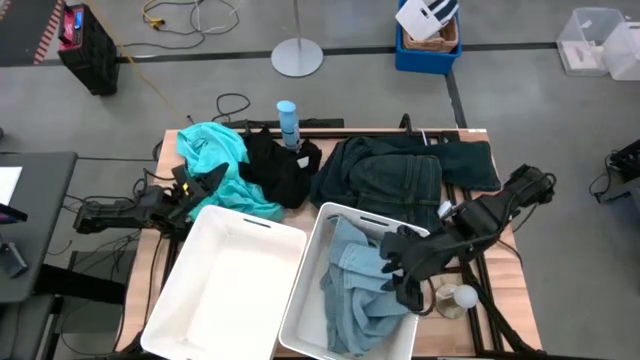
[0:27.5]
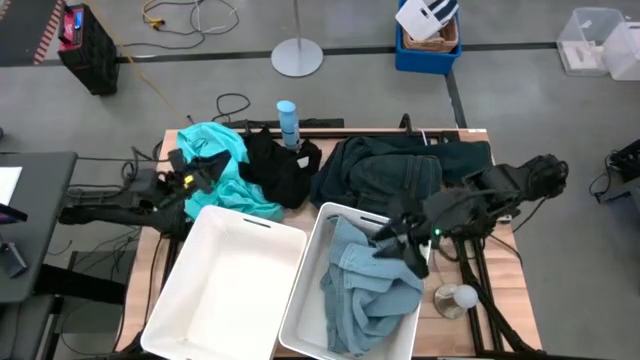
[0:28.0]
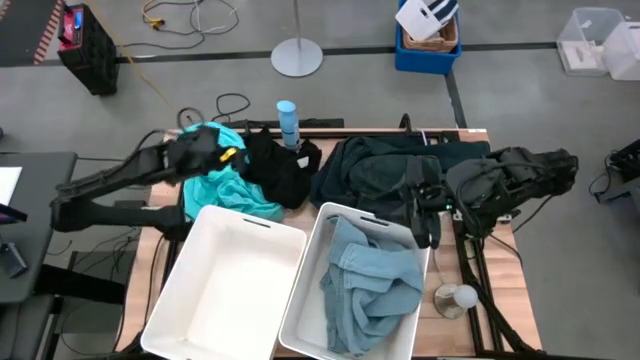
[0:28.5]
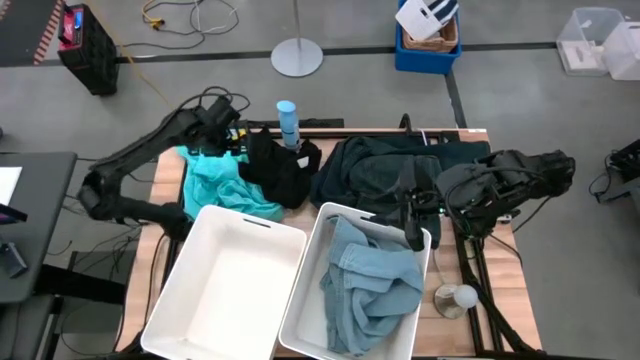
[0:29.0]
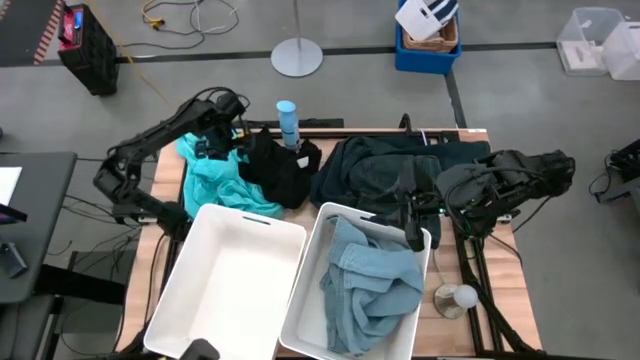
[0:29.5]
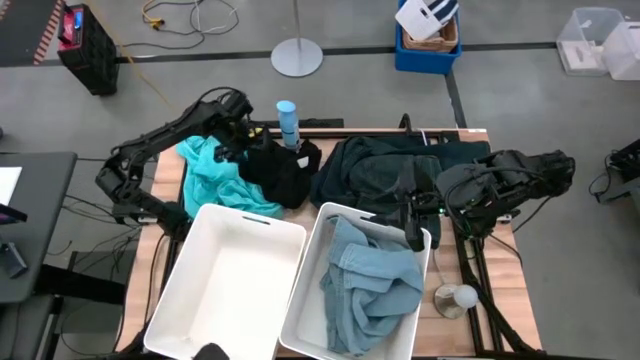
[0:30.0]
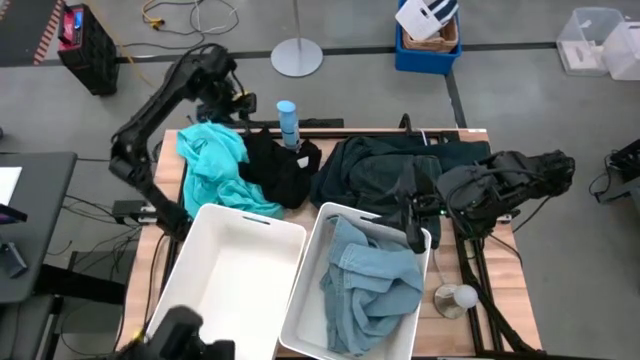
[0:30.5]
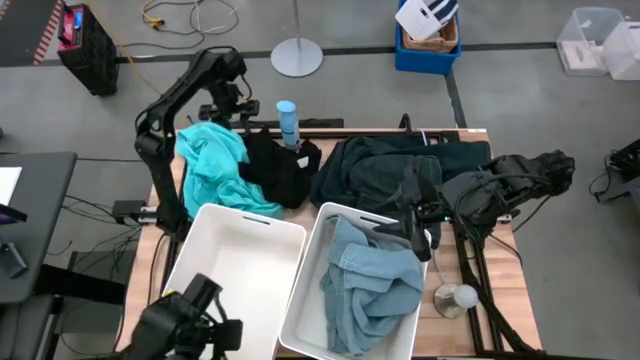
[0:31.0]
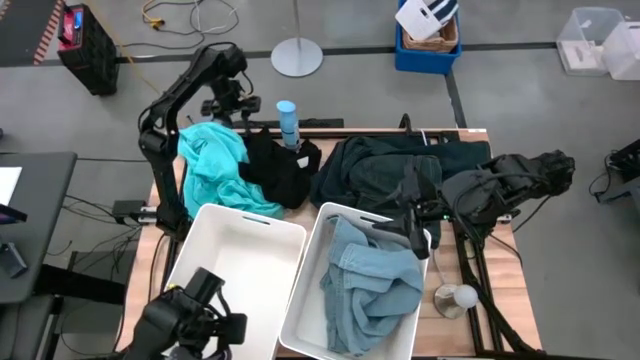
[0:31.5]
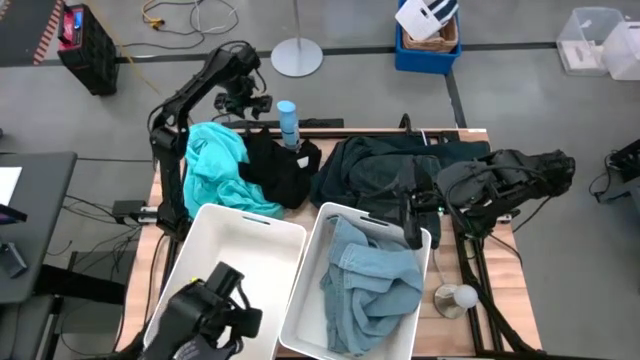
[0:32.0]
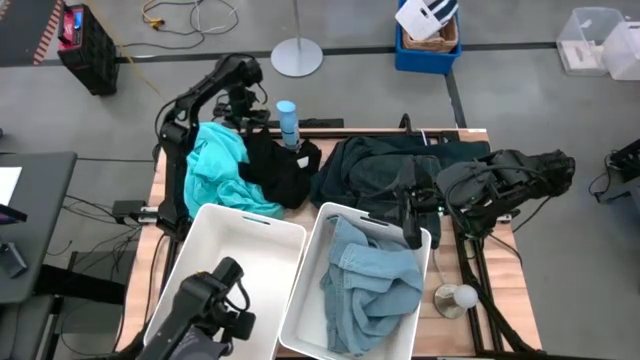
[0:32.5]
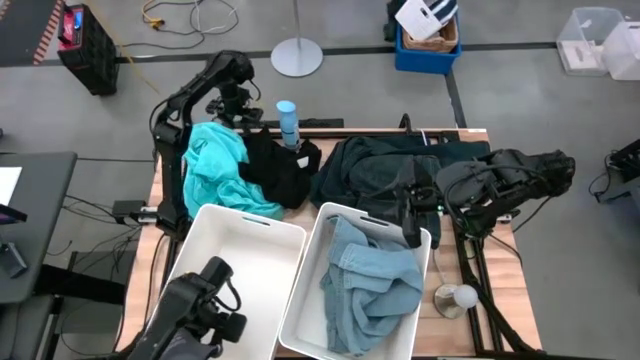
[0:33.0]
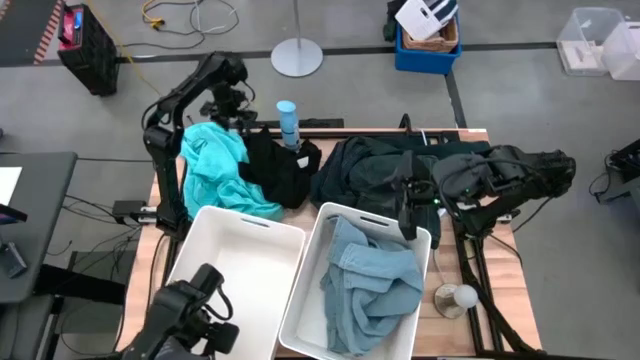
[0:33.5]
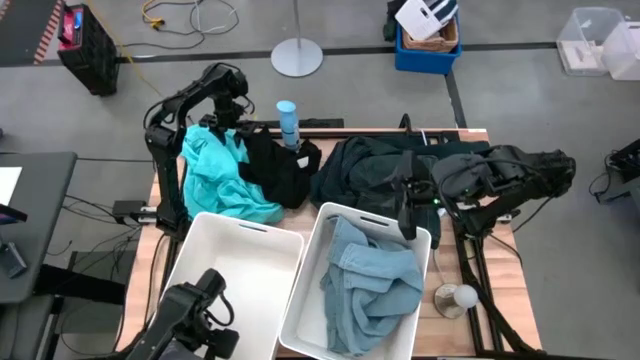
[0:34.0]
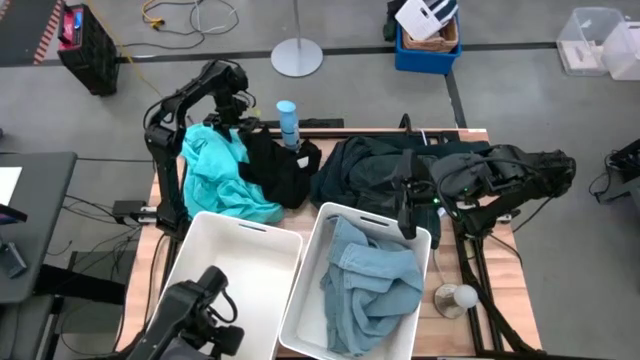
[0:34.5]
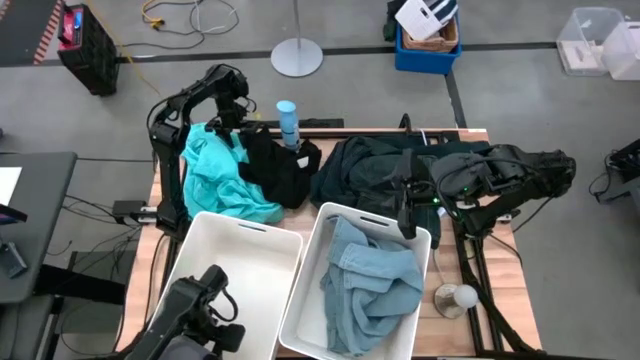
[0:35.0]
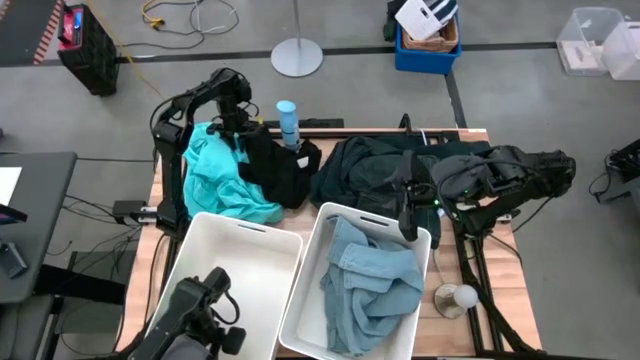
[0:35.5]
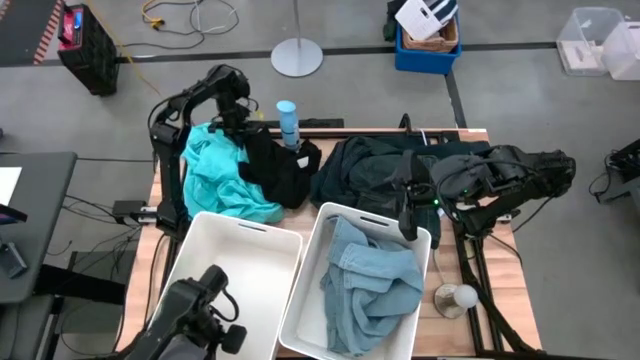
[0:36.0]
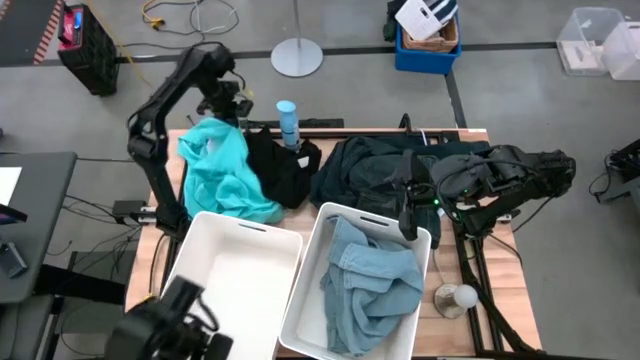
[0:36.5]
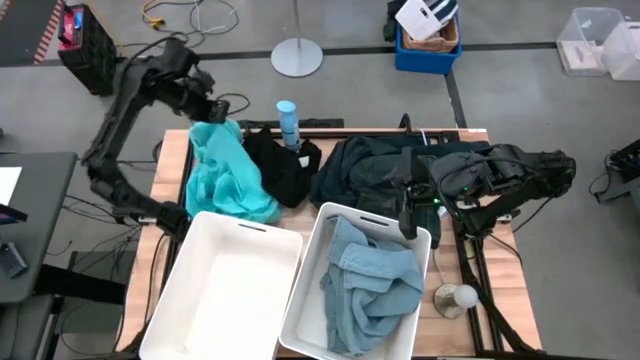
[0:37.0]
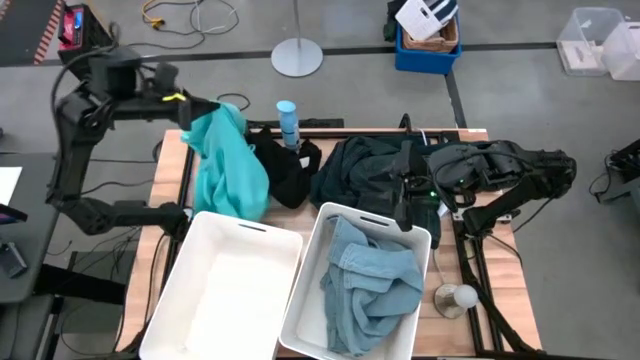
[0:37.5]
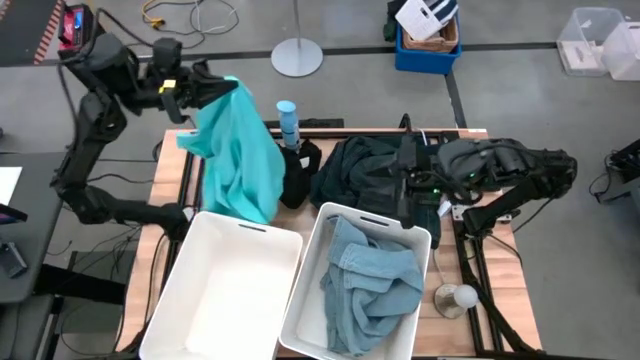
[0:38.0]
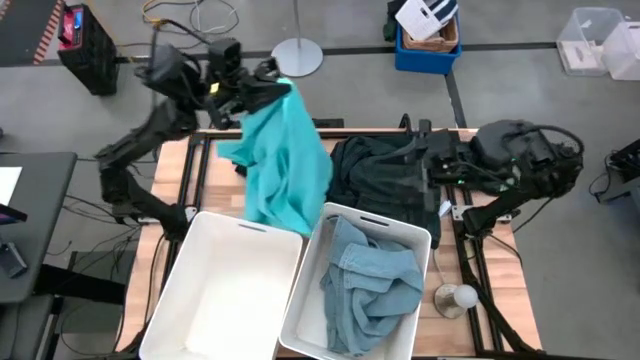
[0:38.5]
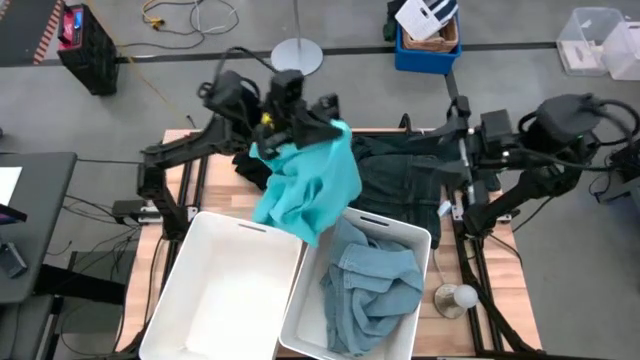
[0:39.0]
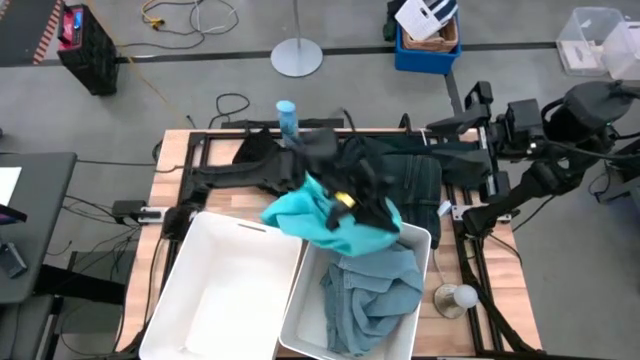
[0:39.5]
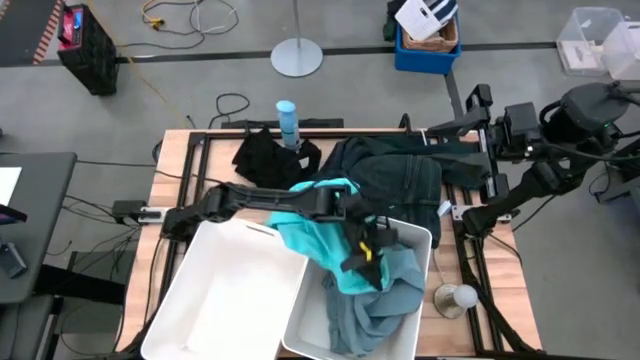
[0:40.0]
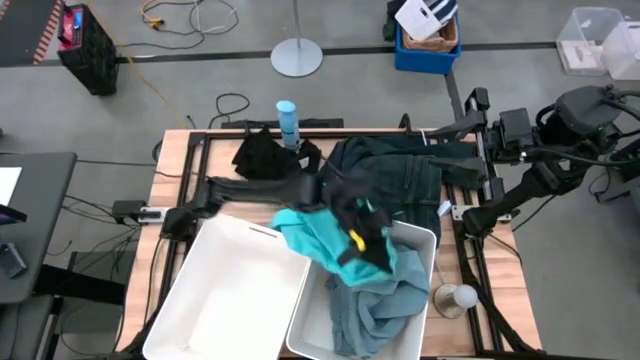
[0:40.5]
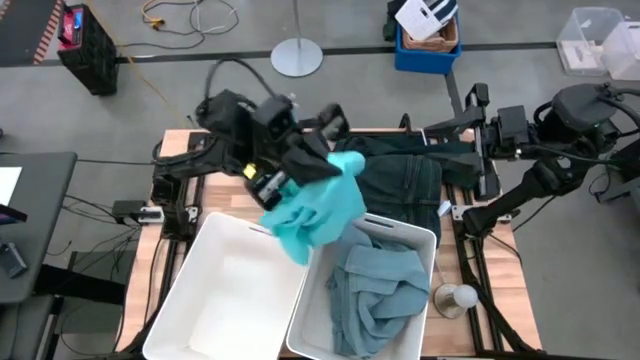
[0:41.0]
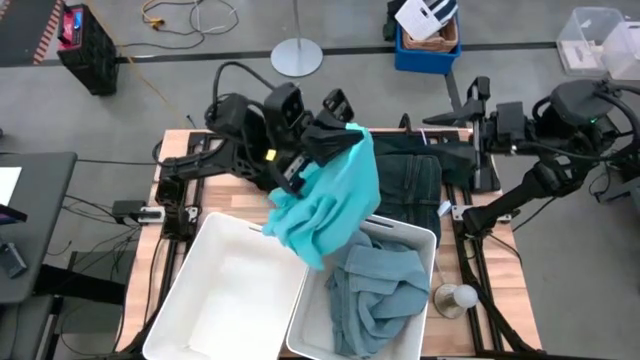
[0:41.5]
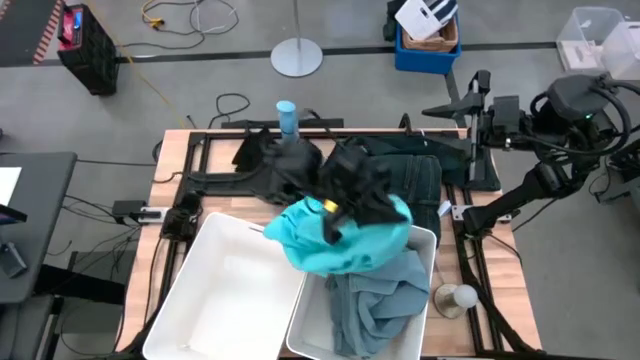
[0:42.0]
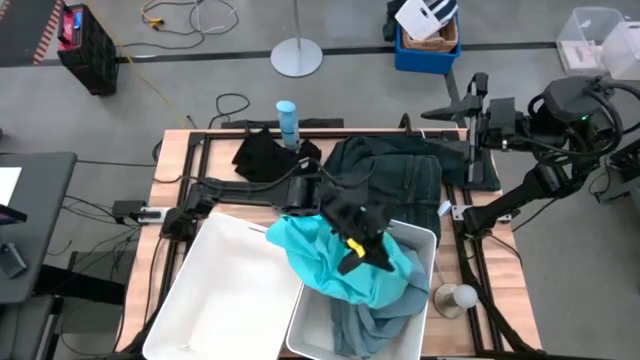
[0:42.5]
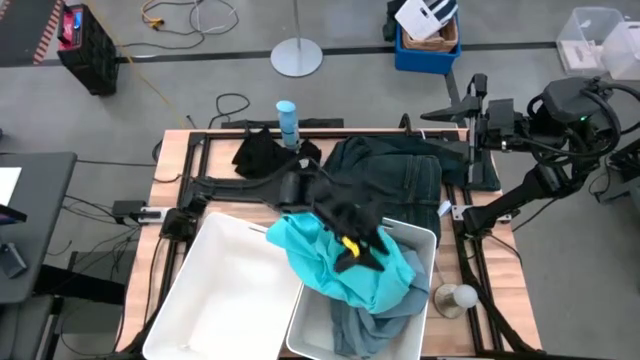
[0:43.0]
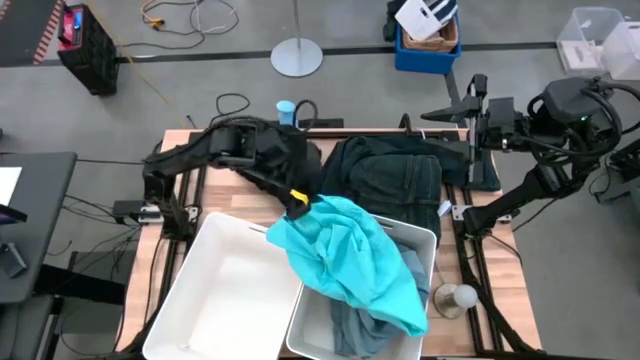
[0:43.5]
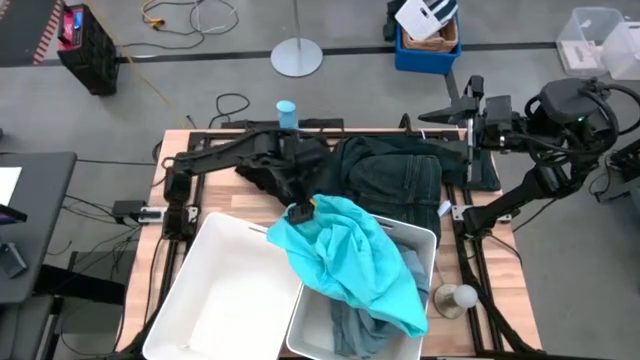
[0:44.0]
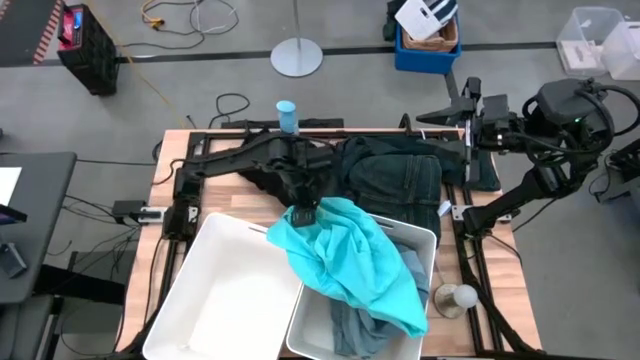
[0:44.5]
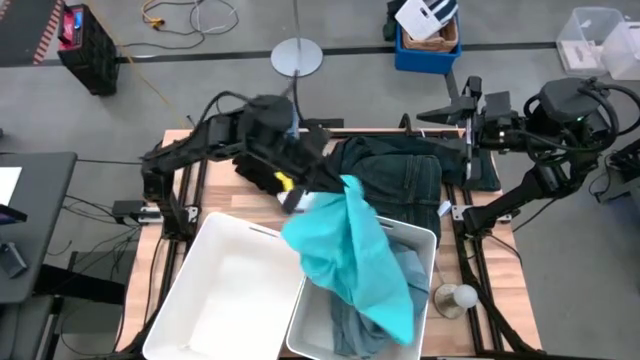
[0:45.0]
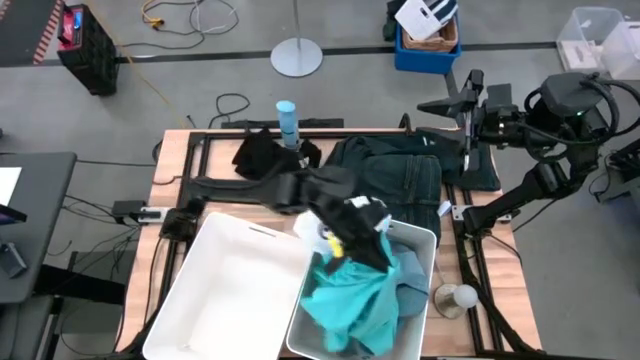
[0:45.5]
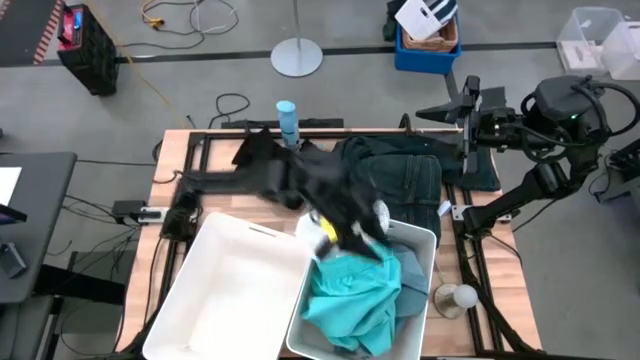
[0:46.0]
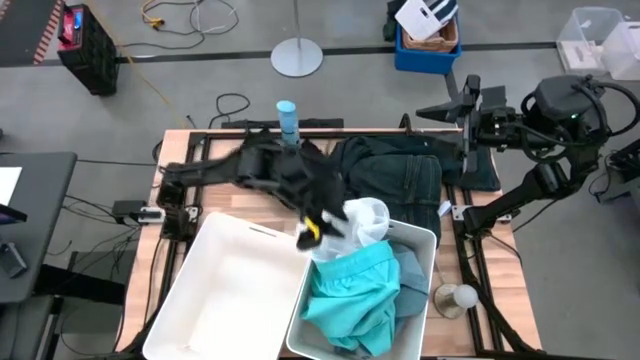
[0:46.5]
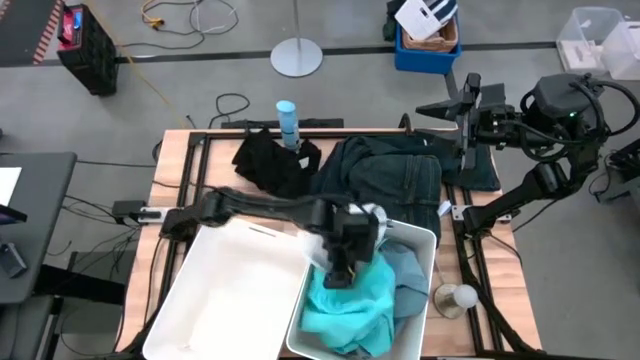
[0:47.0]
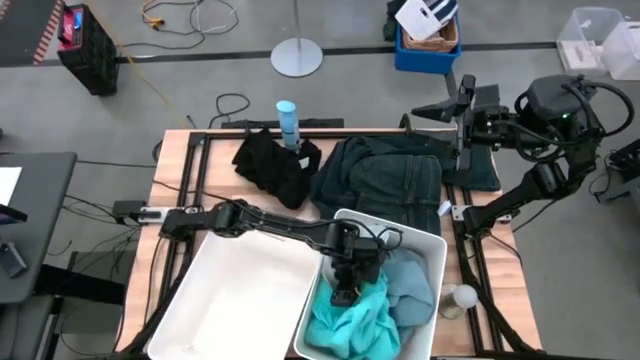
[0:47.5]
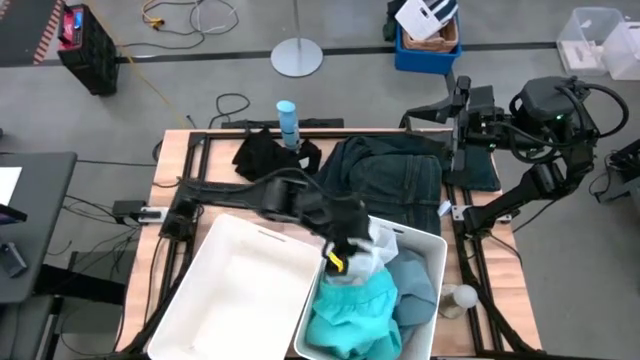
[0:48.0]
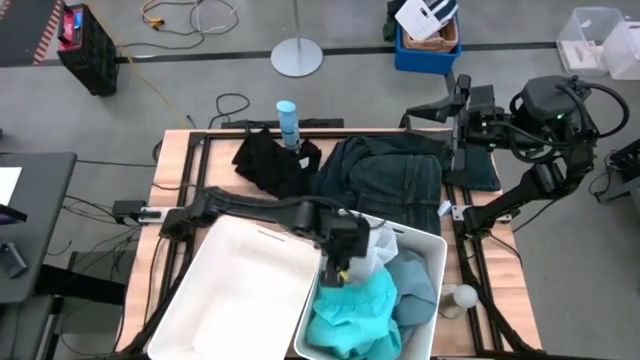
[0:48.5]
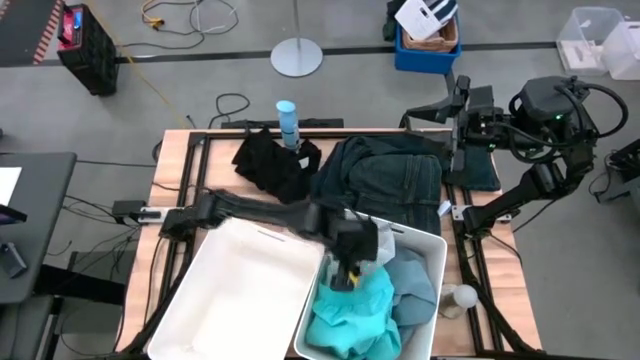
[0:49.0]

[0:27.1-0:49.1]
Task: Sort clothes
Put the light blue shorts into the right white bin
